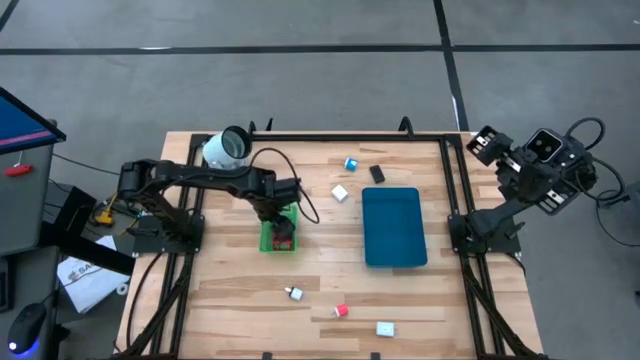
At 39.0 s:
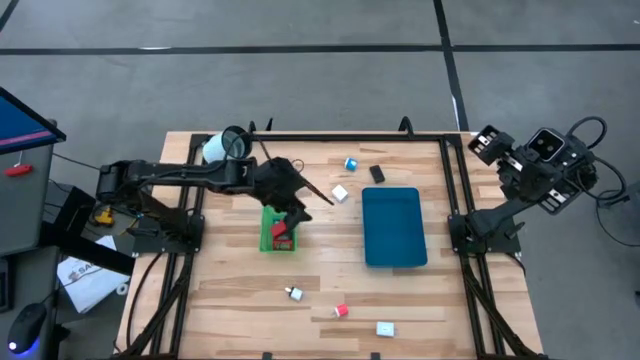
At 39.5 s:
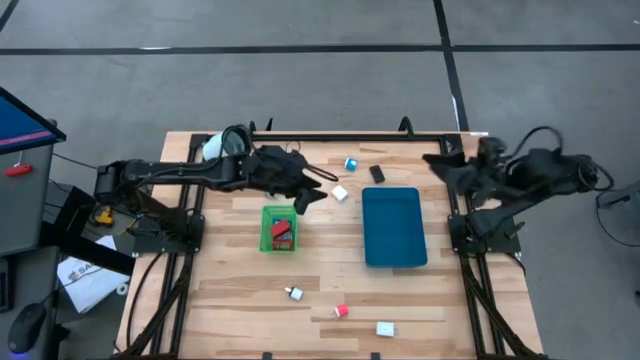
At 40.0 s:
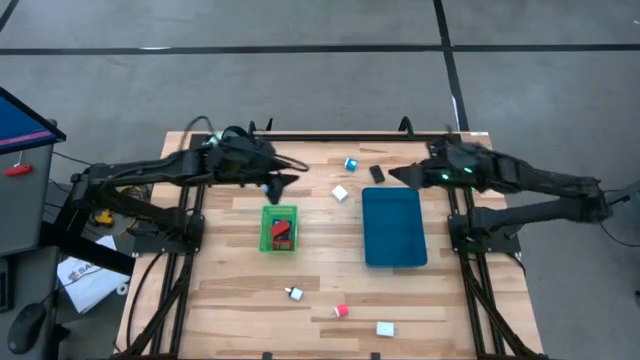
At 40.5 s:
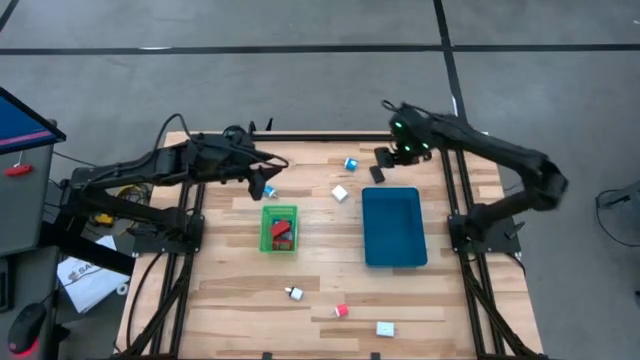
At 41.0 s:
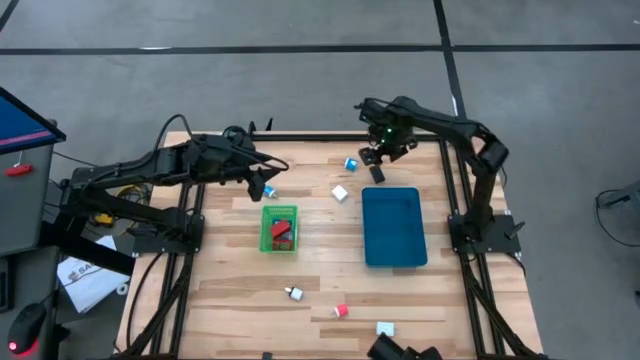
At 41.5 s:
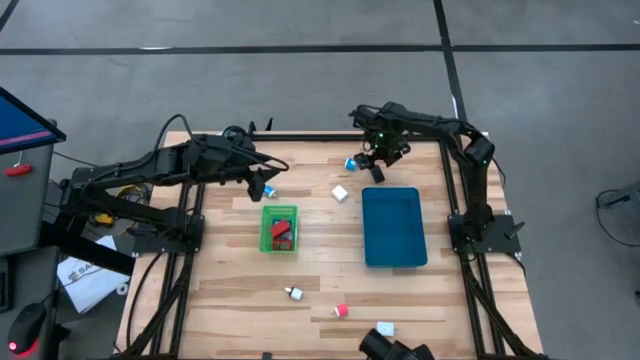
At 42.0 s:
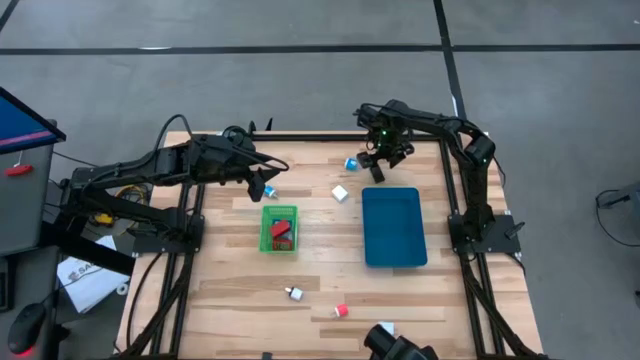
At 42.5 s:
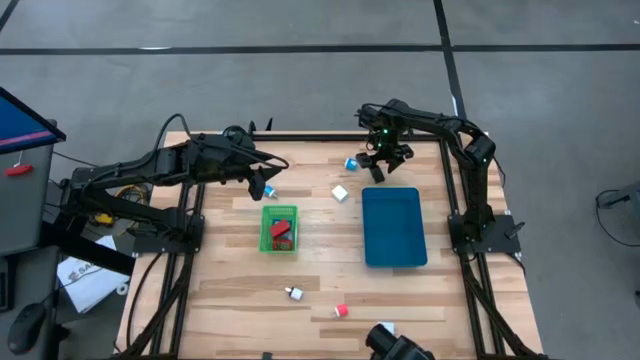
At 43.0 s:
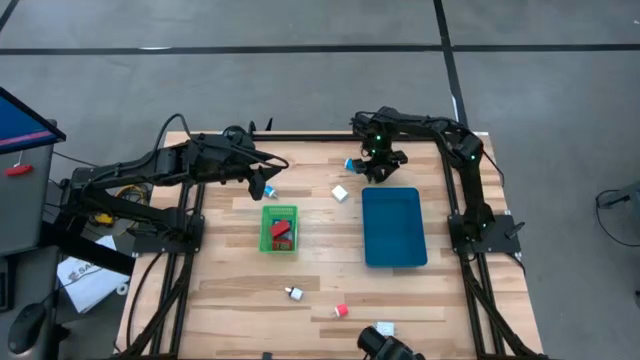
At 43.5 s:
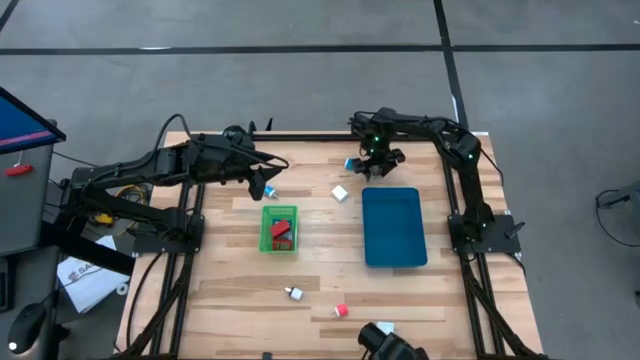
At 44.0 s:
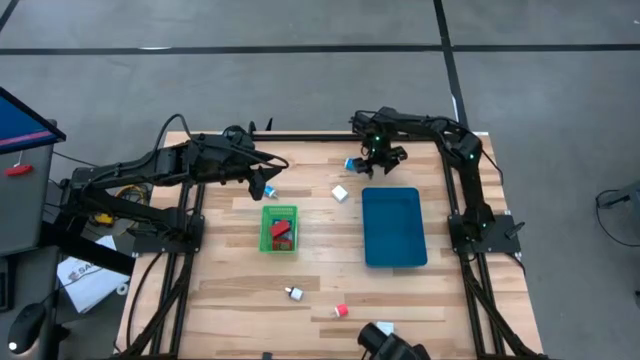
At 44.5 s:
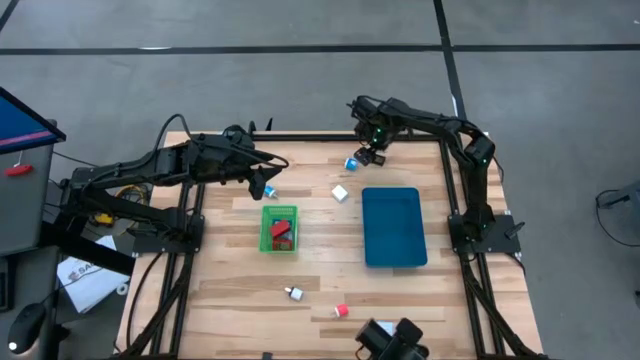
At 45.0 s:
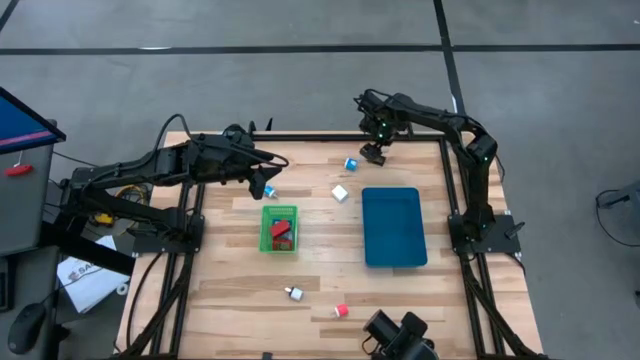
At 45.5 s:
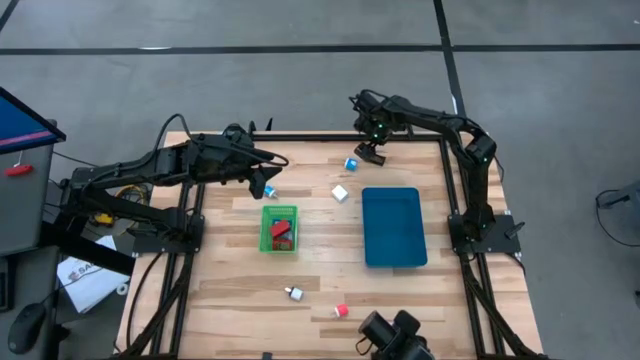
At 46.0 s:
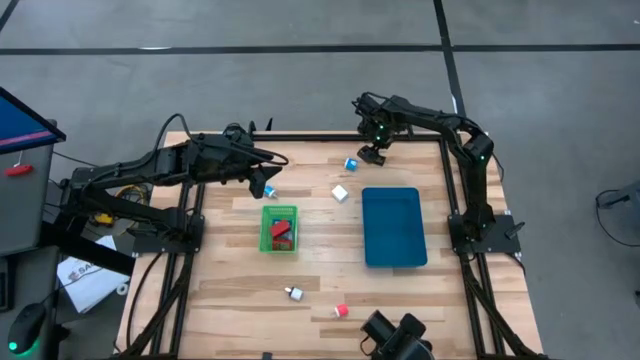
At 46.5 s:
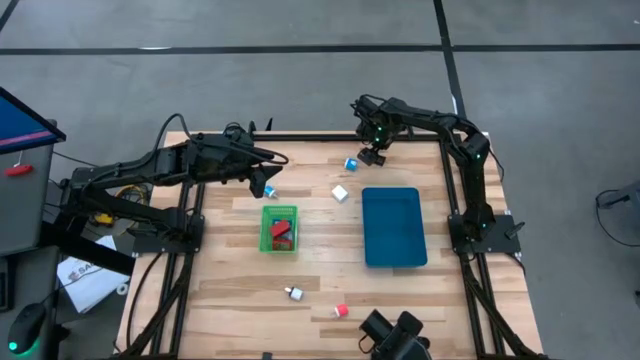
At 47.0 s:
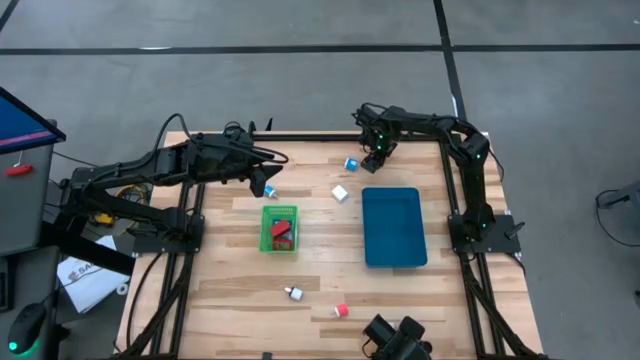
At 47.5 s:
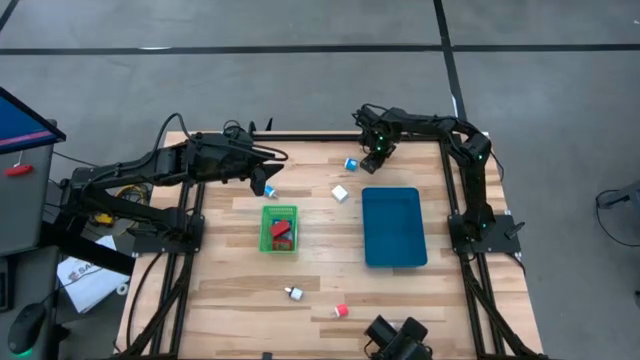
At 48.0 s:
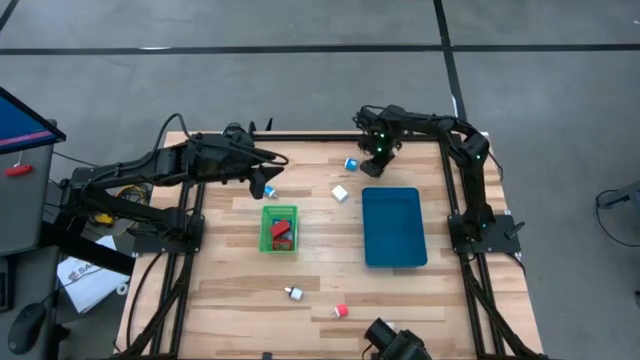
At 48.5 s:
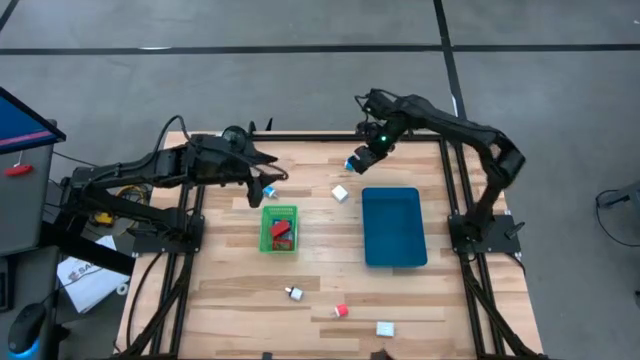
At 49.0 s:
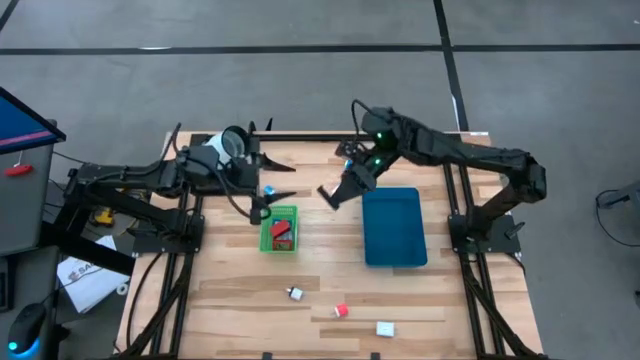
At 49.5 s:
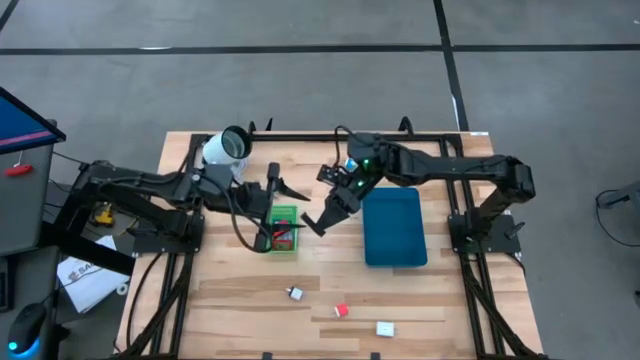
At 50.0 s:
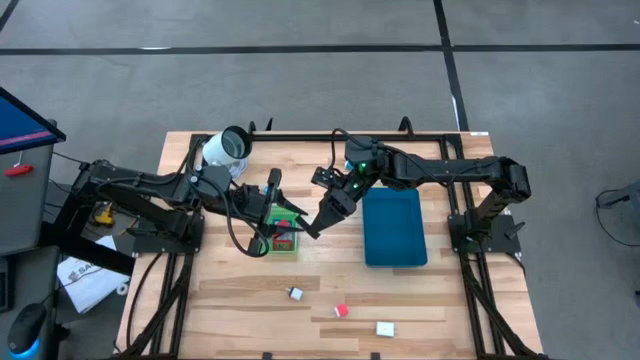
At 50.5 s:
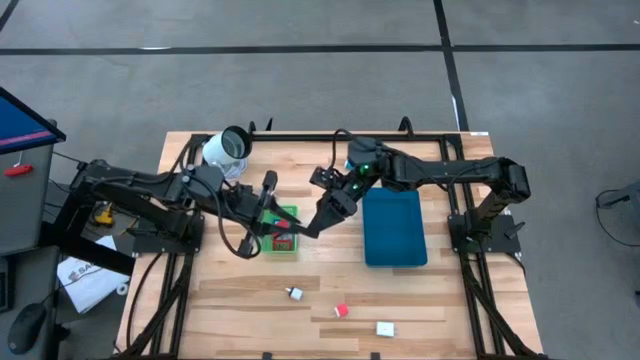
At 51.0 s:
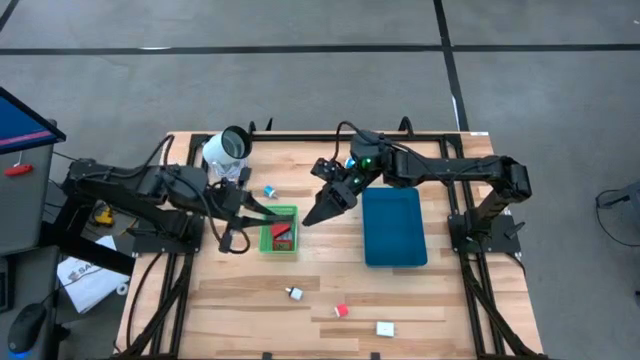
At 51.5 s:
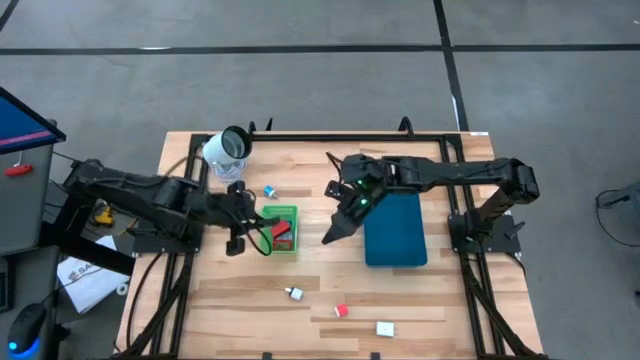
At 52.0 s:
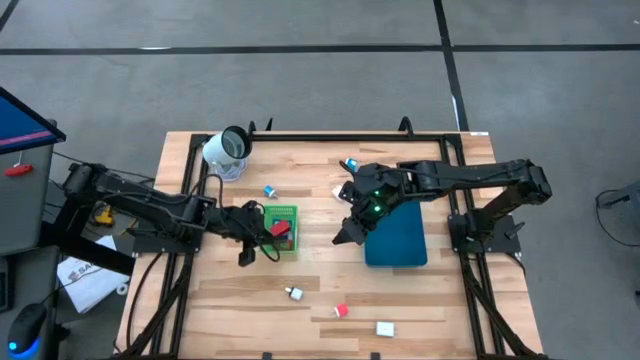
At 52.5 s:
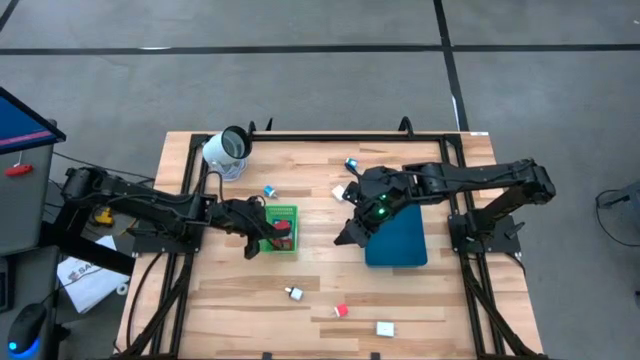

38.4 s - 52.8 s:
Task: Pick & Place Office items
Put the black digital timer into the green basket

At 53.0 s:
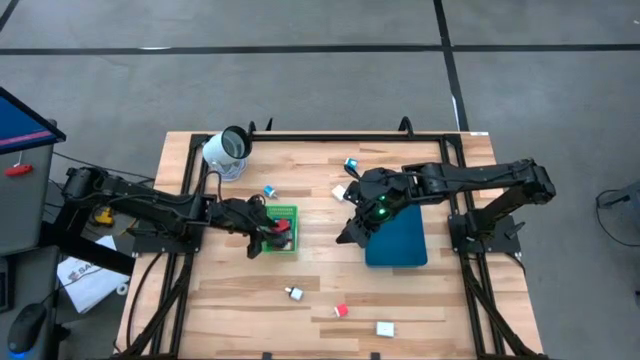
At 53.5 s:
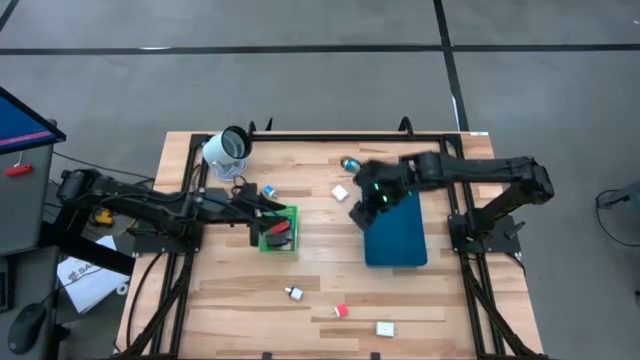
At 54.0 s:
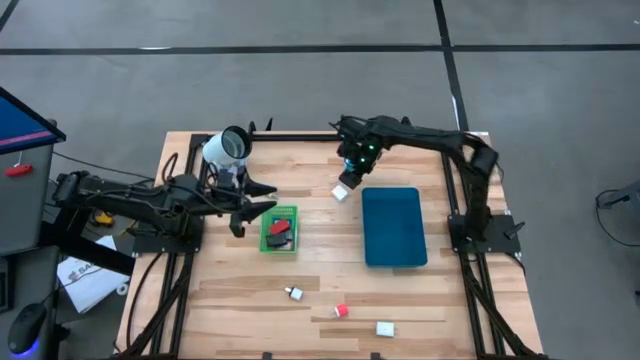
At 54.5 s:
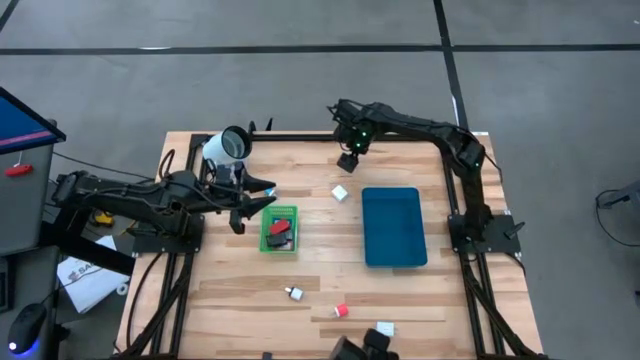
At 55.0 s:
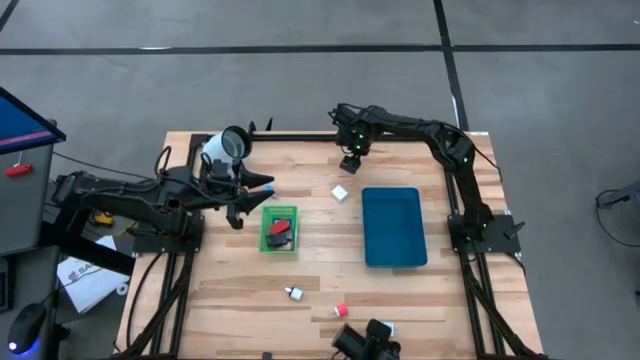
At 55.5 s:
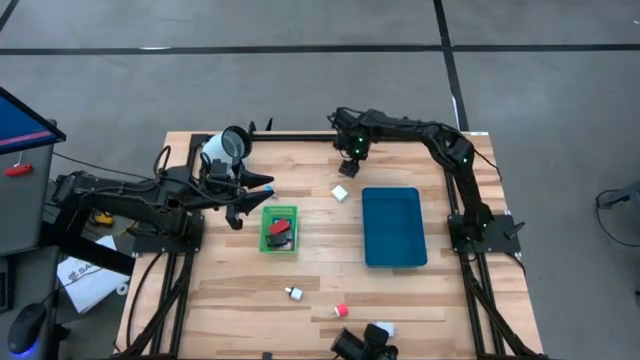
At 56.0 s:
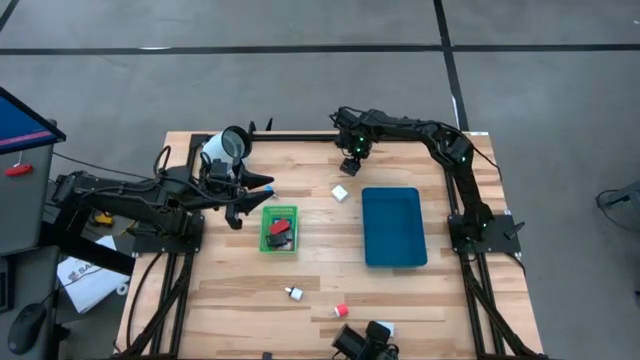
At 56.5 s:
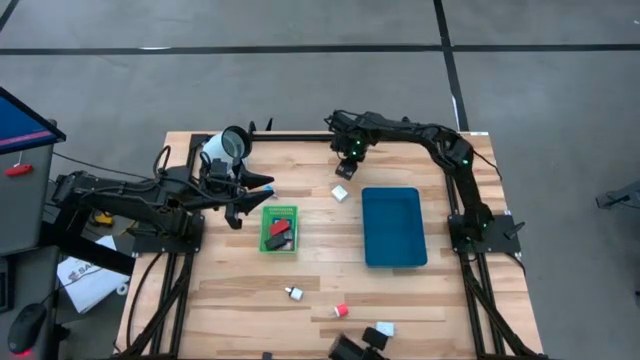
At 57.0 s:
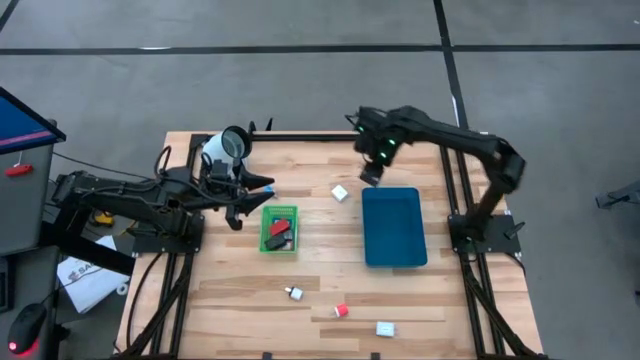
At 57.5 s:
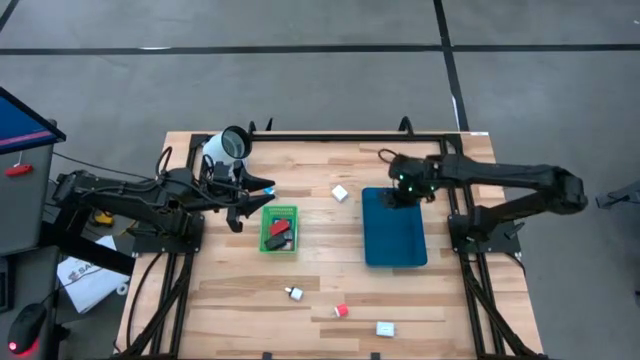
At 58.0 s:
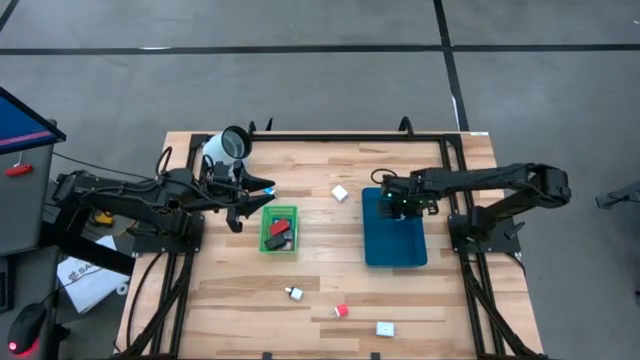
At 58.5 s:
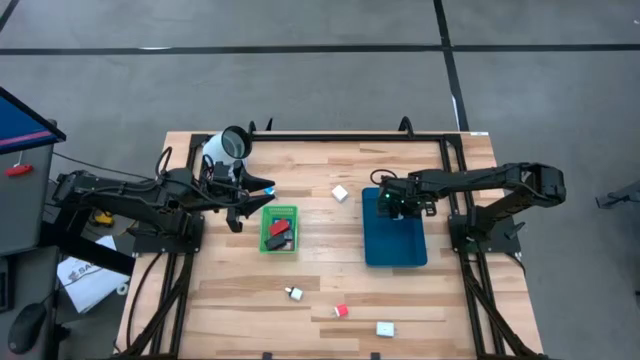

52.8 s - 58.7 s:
Put the top blue charger adapter into the blue bin

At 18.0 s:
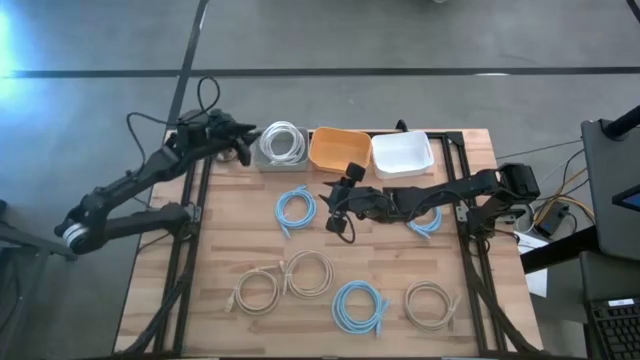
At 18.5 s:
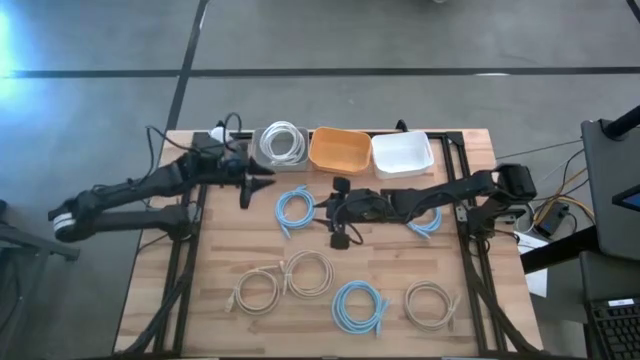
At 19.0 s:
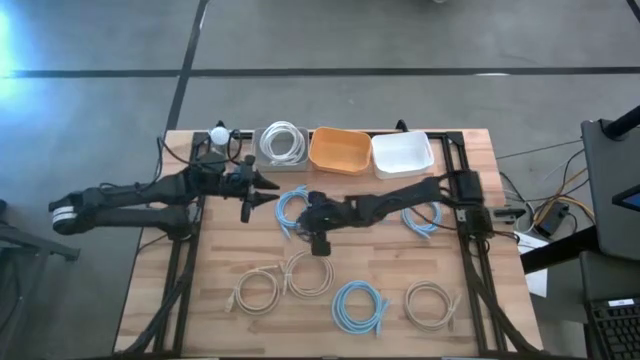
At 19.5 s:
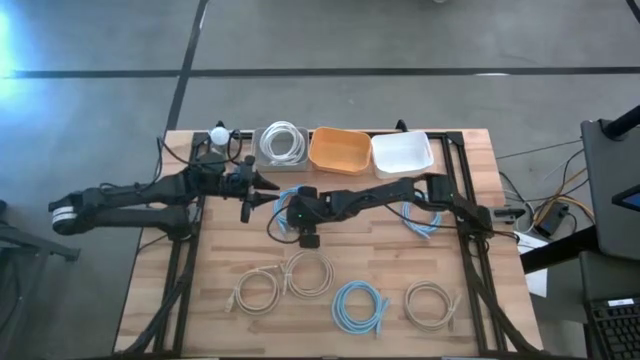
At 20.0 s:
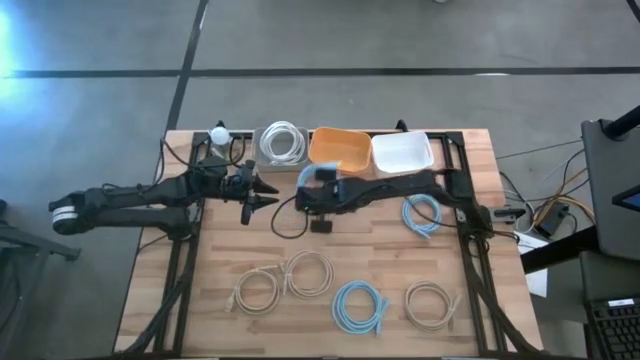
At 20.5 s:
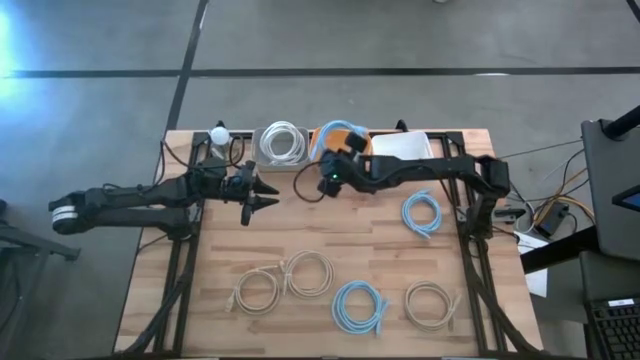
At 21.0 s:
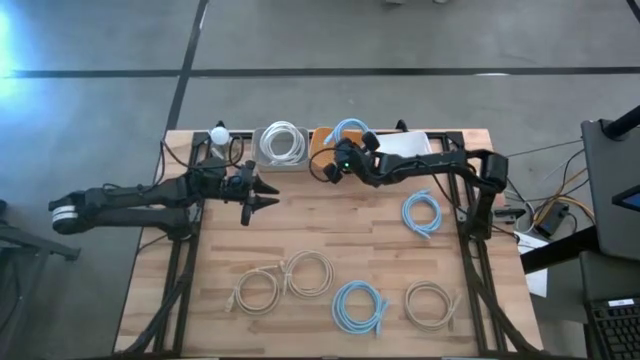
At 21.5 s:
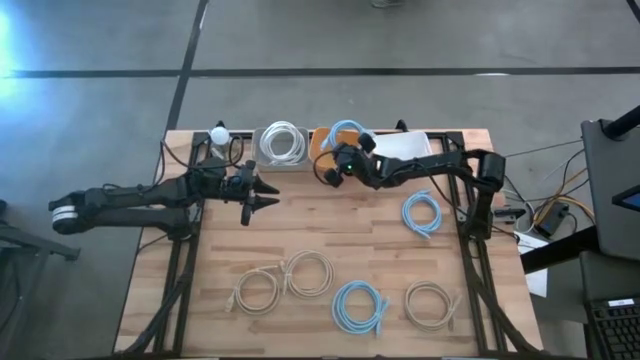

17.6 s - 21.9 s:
Task: Pick & Place USB Port
Put the top left blue charger cable into the orange bin
